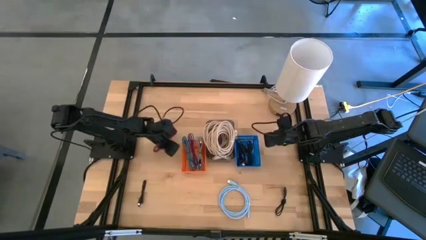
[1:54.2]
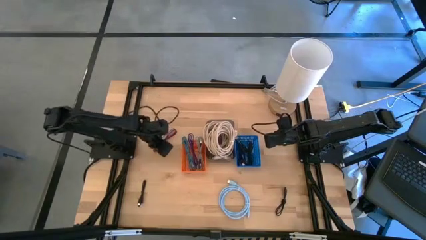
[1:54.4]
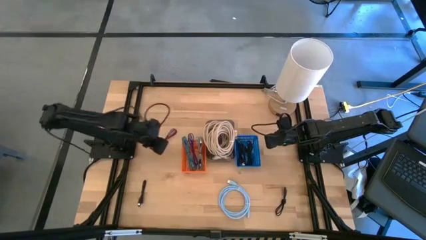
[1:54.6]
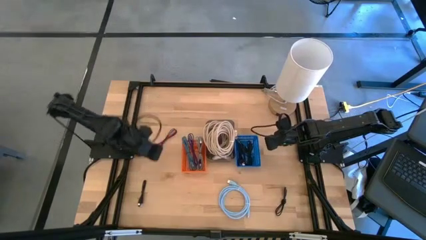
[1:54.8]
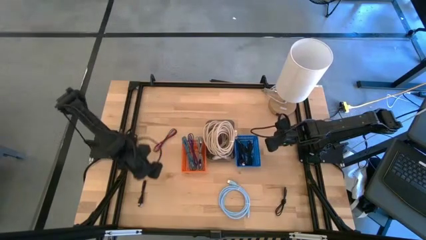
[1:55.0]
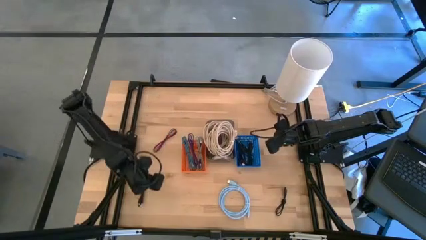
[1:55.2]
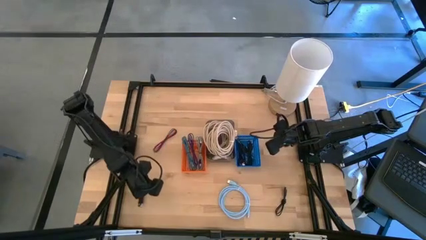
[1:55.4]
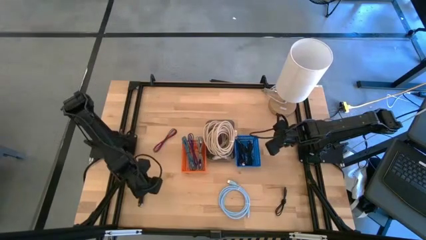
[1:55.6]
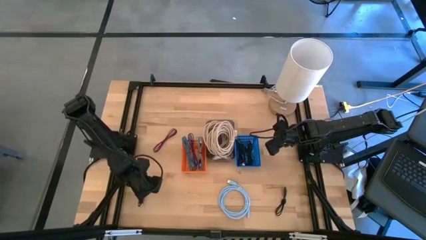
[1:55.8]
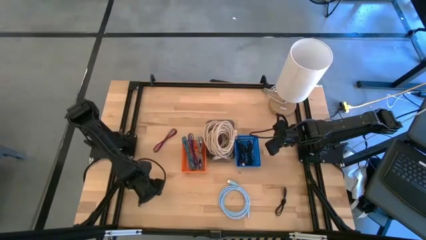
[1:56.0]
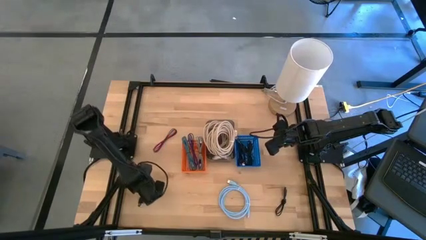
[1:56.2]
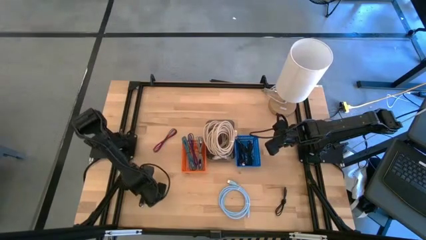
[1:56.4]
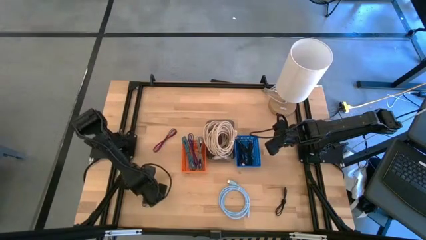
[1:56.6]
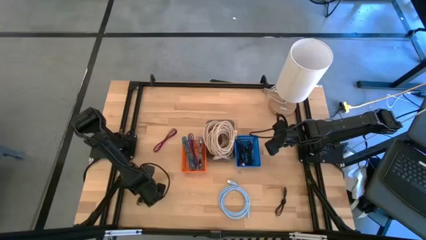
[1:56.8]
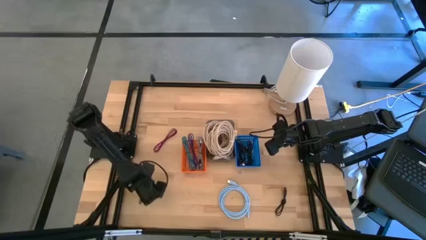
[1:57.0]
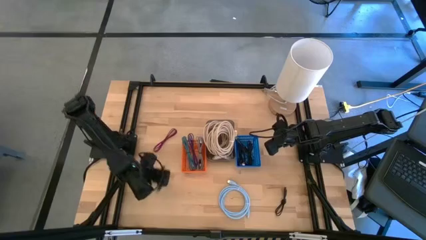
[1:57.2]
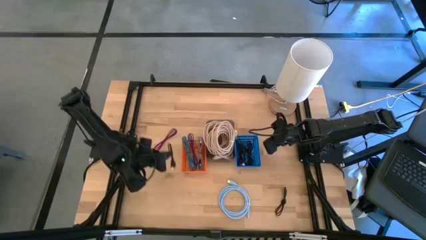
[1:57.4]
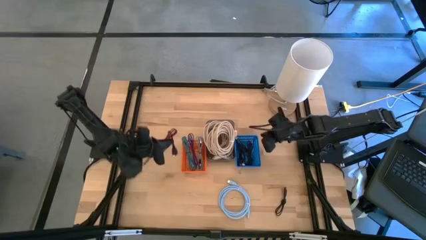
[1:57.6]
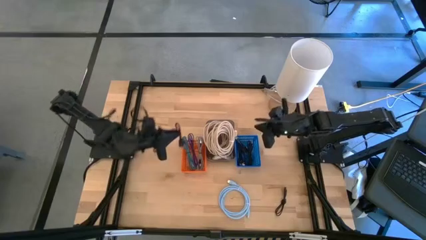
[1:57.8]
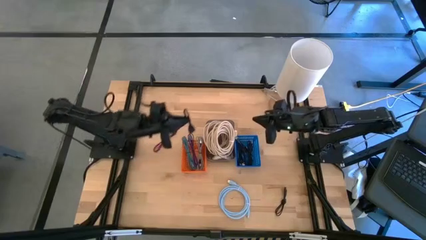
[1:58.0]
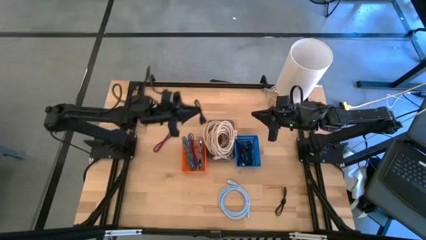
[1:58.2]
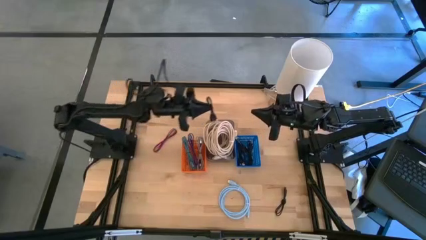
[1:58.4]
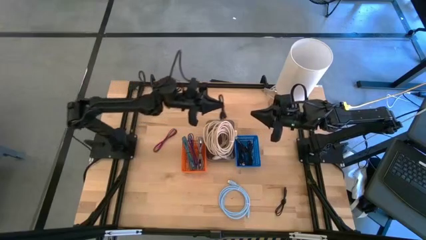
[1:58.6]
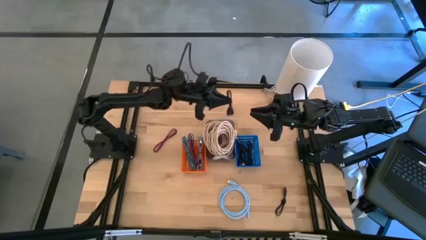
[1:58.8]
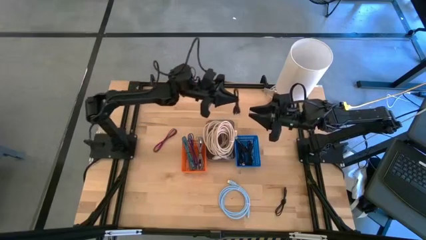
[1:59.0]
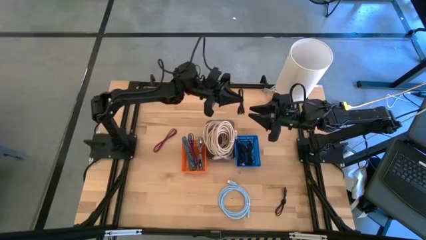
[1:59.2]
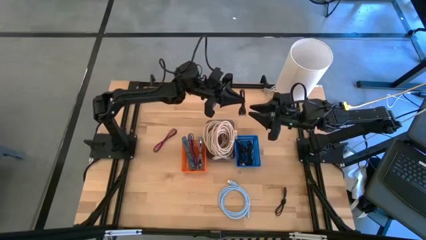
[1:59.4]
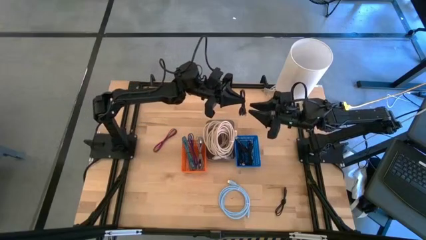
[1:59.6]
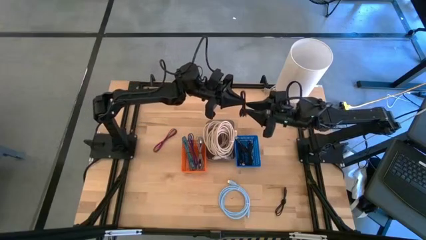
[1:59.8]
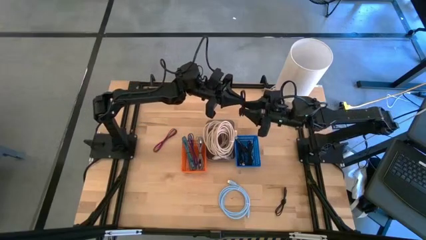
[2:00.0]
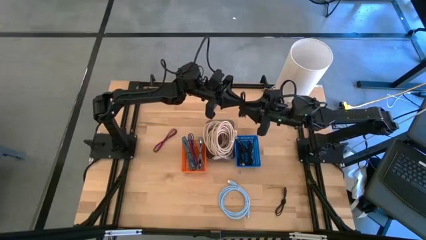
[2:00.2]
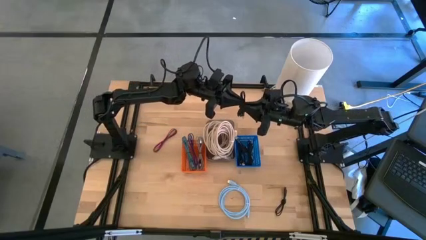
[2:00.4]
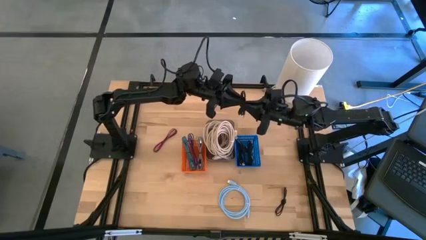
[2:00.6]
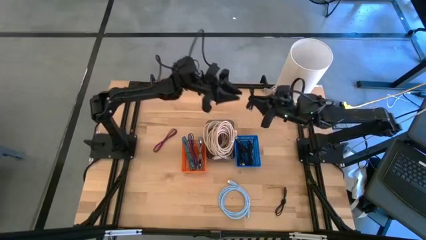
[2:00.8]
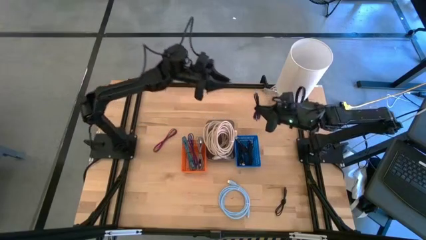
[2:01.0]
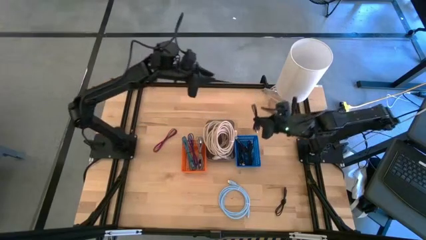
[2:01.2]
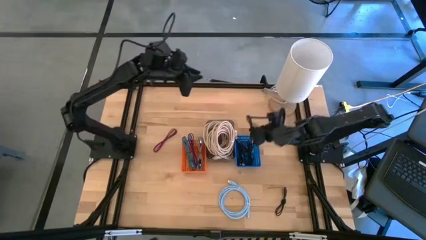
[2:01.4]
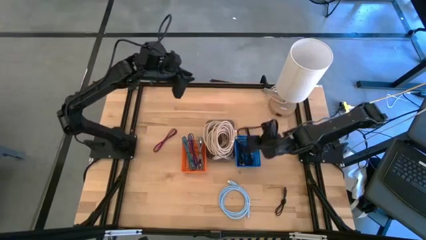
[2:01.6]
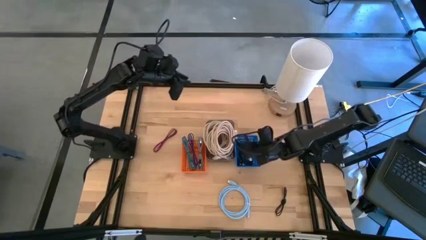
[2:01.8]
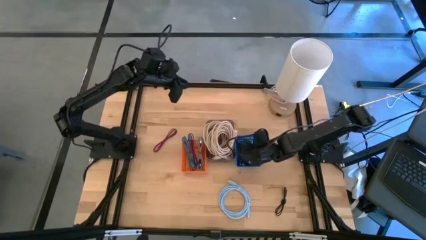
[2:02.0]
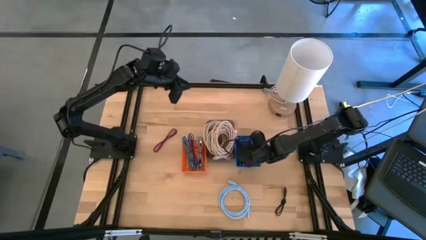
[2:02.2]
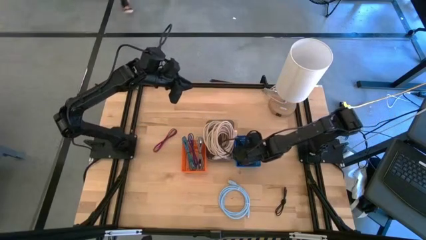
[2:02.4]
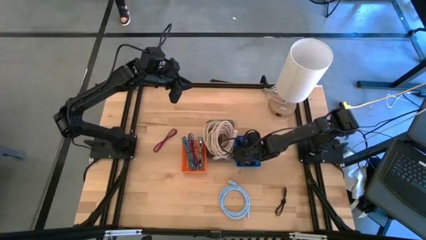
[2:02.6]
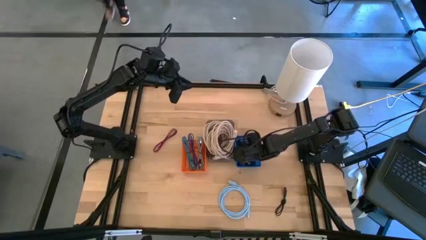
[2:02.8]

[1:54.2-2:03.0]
Task: Pick & Place USB Port
Put the black charger cable into the blue bin

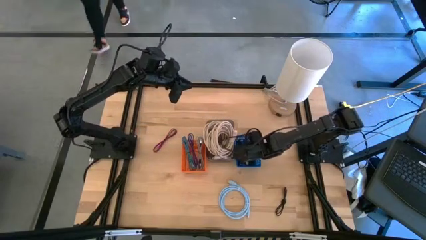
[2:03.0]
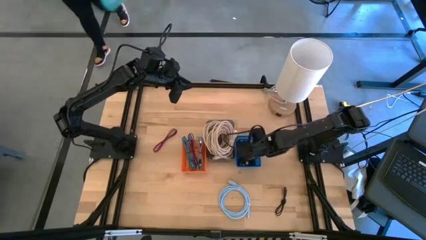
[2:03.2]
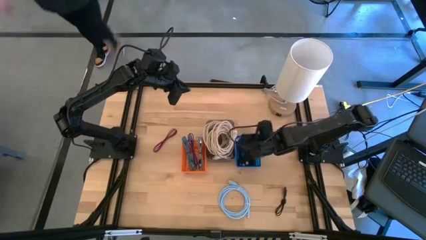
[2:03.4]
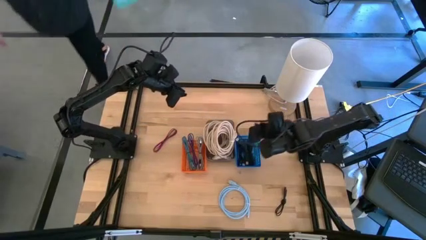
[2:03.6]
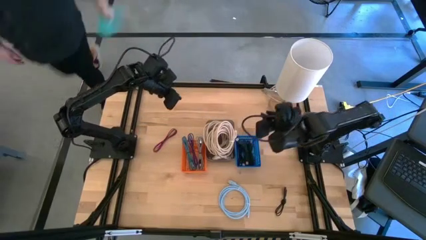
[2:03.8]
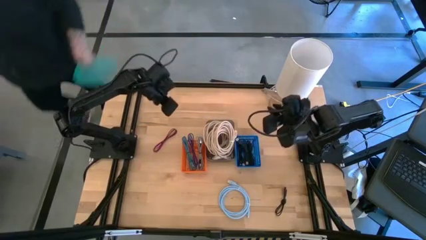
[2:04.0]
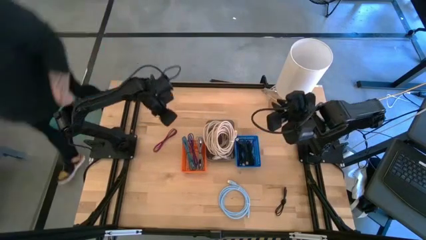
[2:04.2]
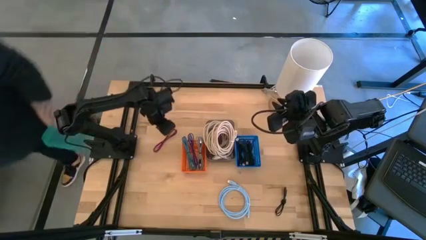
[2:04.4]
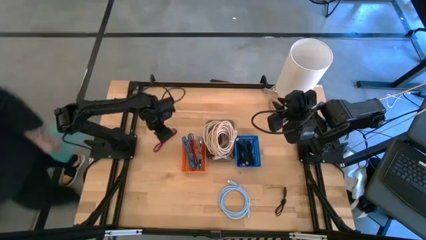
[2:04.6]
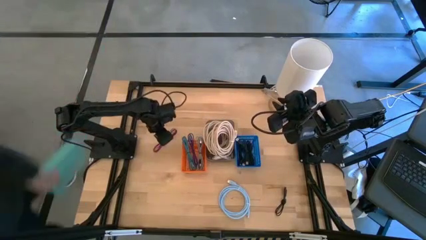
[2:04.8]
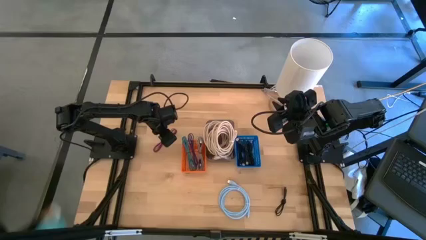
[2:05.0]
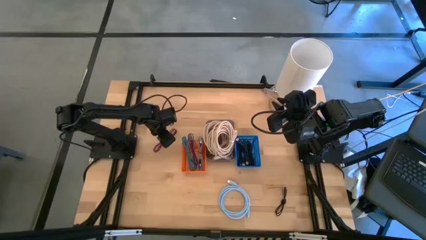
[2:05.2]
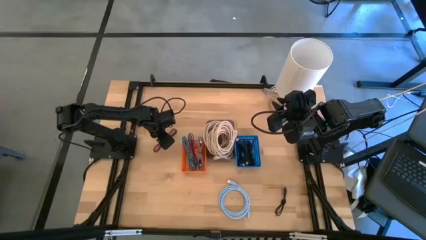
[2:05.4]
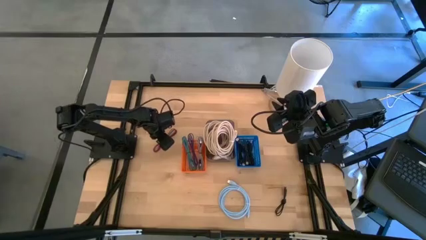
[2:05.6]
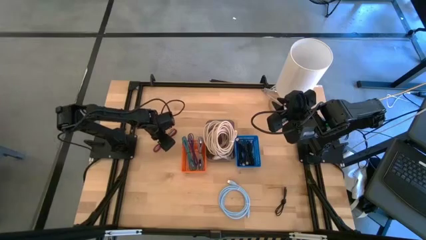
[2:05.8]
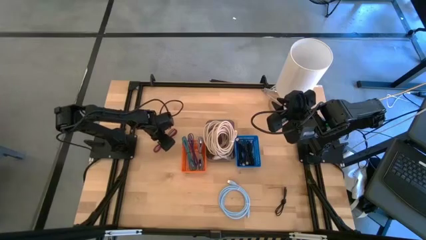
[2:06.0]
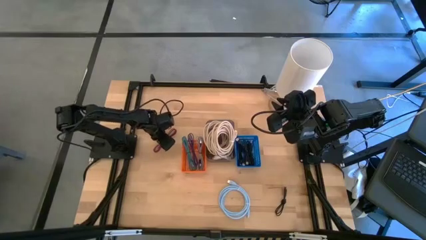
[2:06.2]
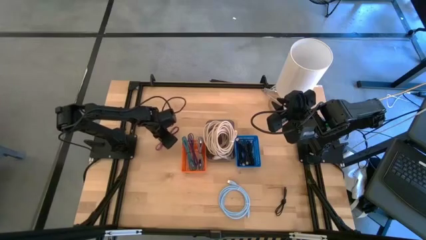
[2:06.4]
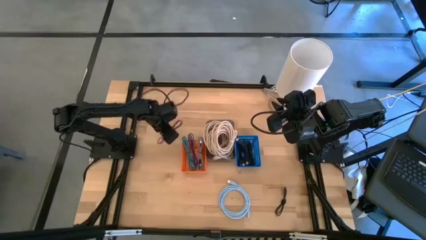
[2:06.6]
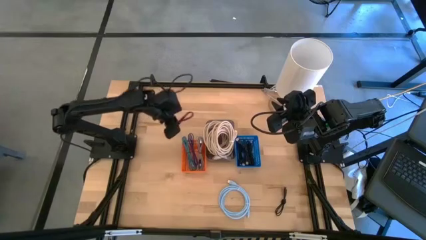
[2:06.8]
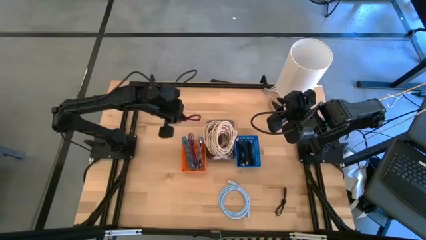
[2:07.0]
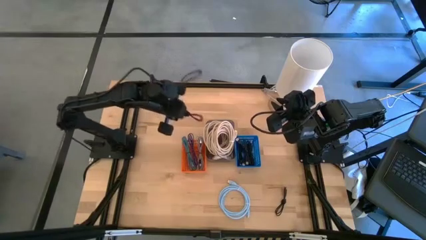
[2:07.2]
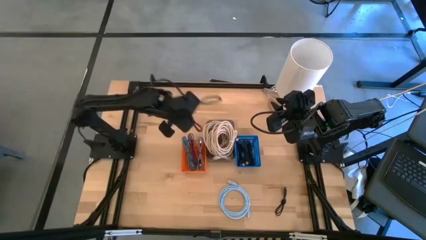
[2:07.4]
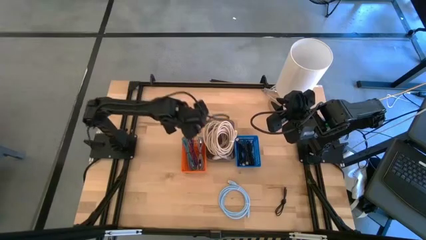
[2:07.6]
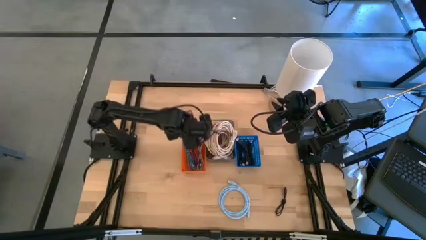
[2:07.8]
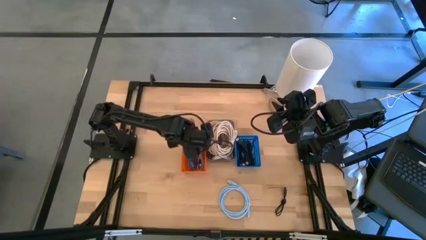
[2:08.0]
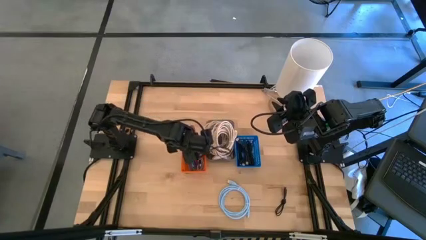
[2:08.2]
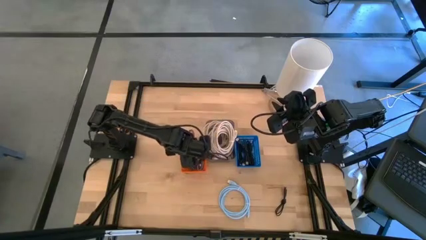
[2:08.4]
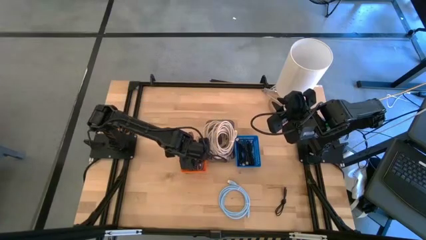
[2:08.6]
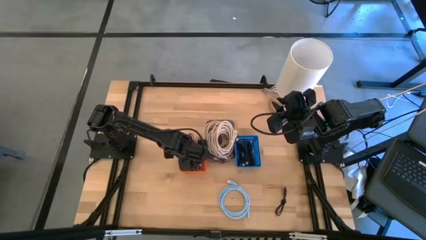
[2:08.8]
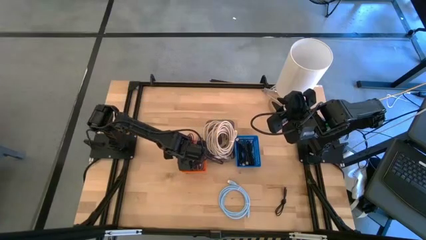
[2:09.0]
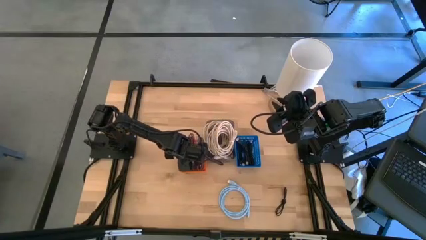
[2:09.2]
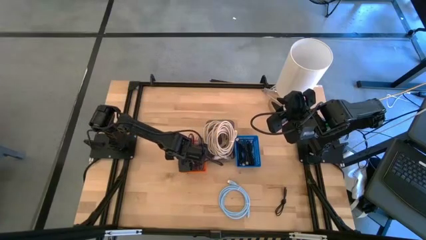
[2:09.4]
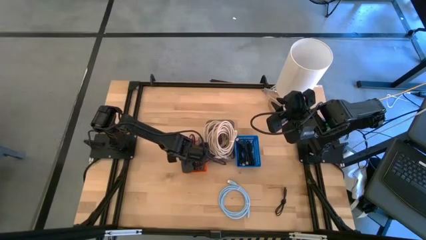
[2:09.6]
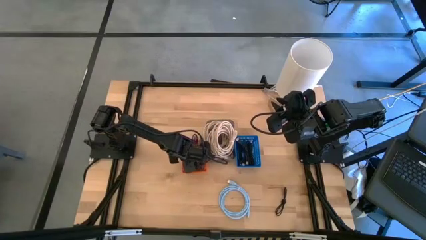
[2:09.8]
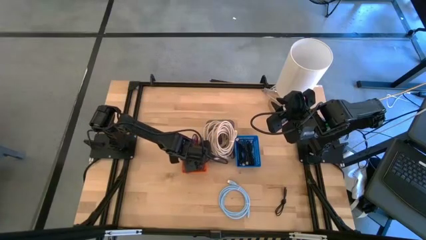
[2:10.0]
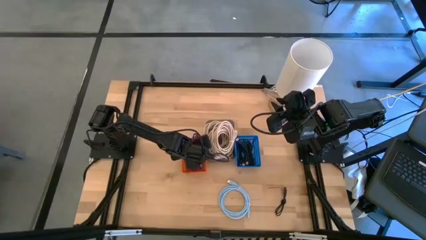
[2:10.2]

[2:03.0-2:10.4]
Put the black and pink charger cable into the orange bin
